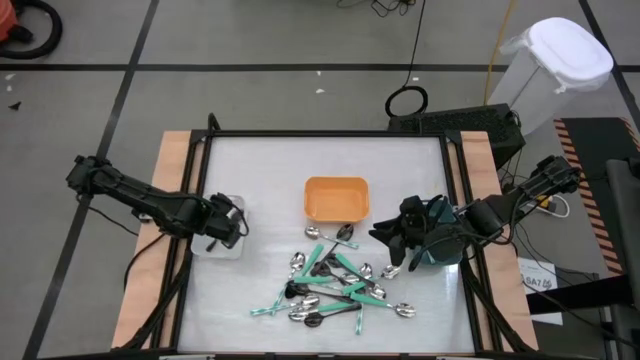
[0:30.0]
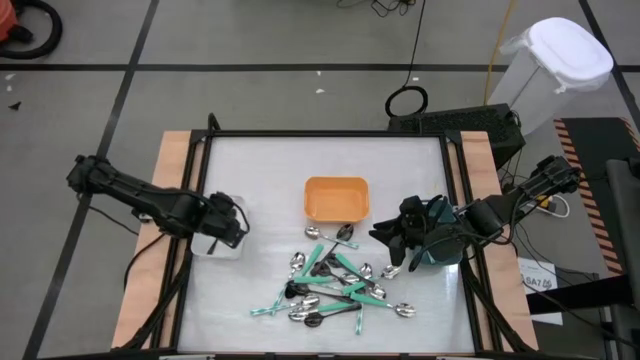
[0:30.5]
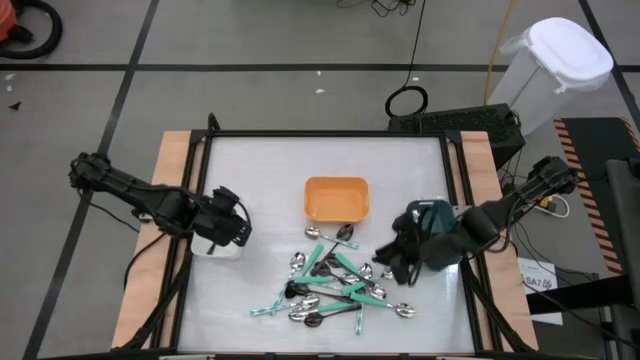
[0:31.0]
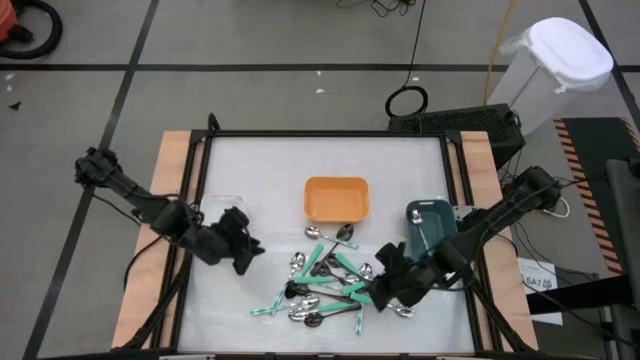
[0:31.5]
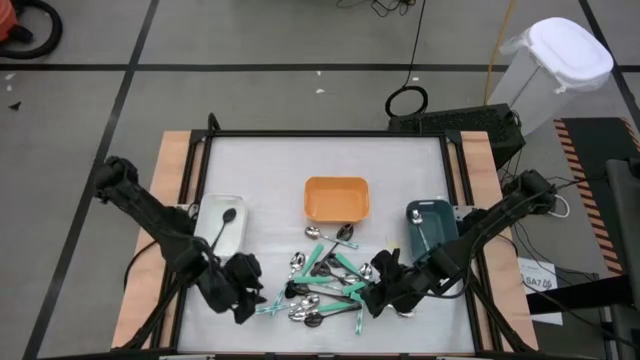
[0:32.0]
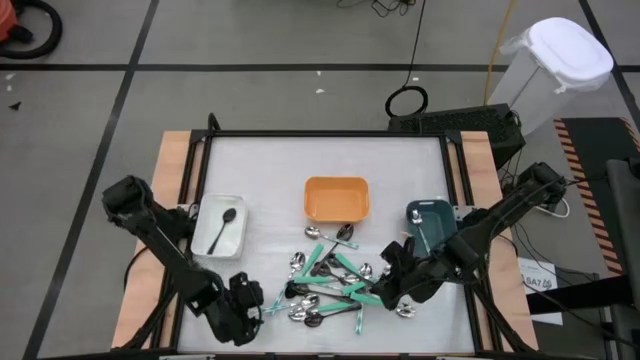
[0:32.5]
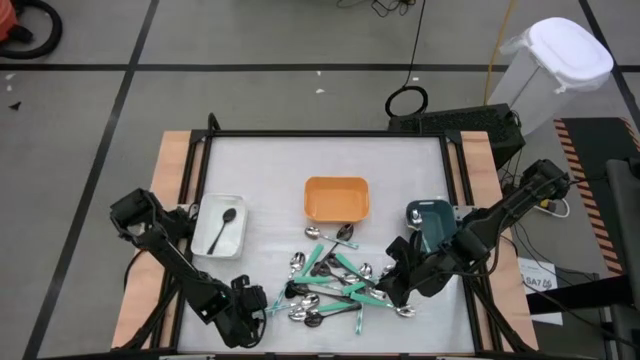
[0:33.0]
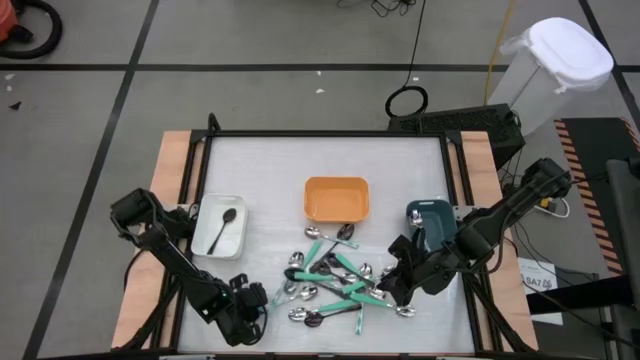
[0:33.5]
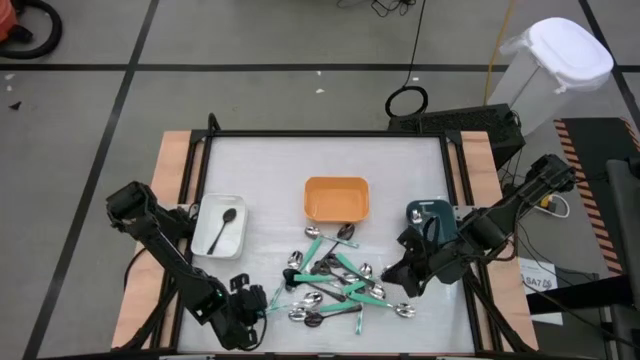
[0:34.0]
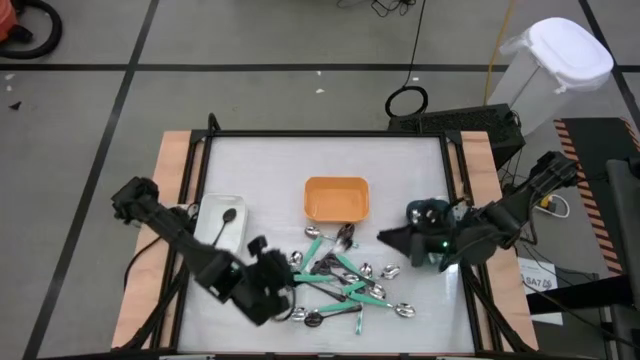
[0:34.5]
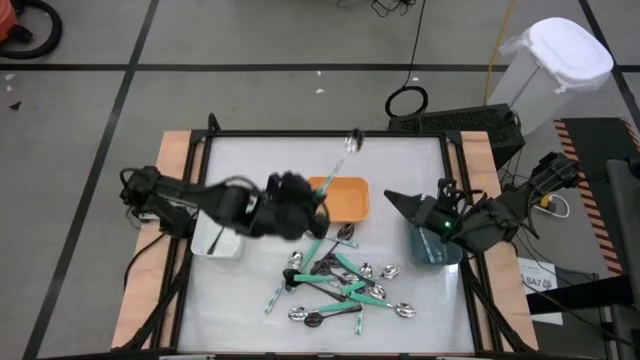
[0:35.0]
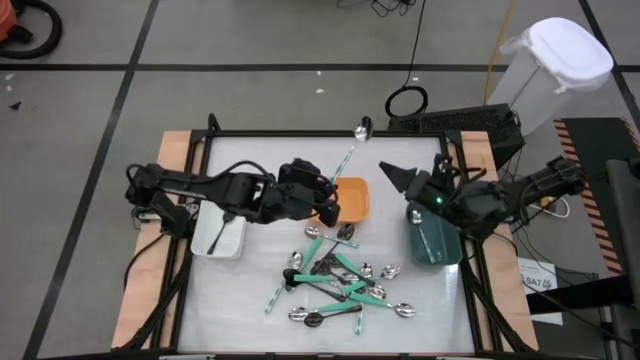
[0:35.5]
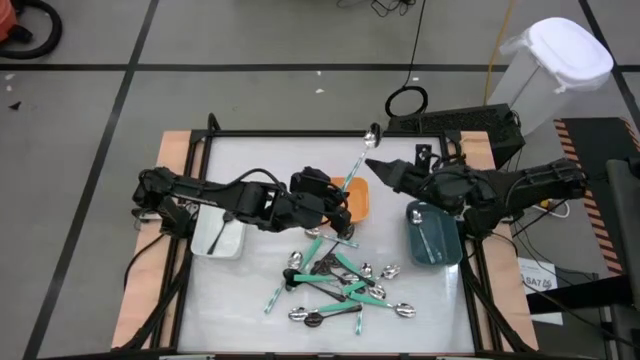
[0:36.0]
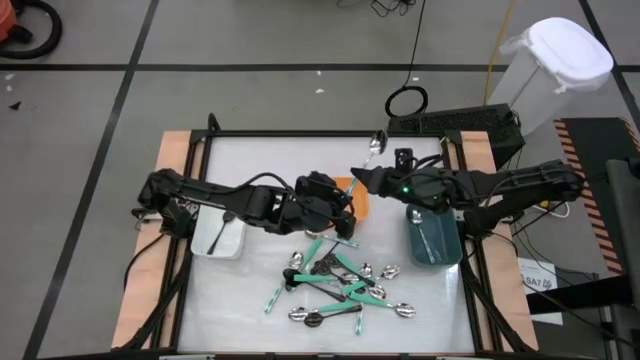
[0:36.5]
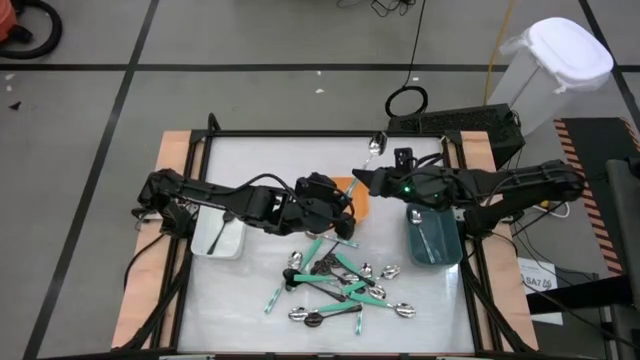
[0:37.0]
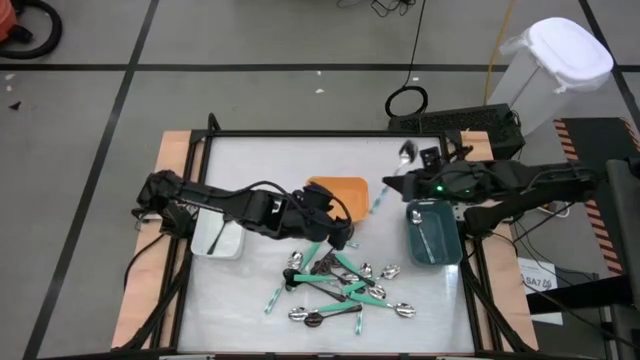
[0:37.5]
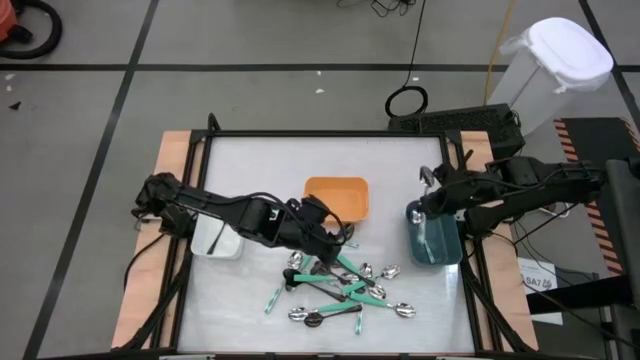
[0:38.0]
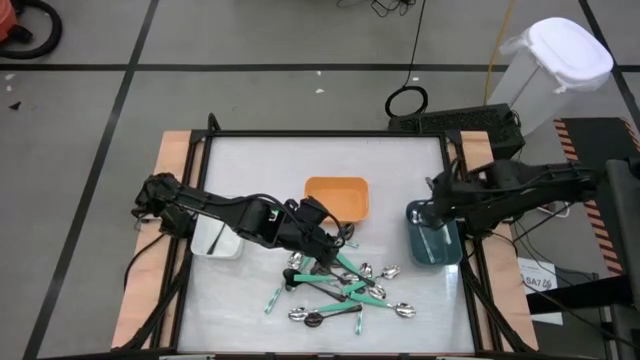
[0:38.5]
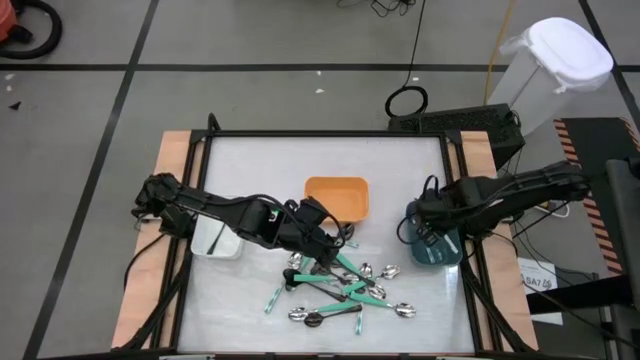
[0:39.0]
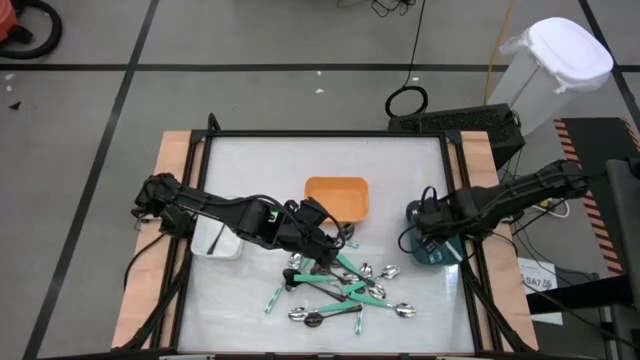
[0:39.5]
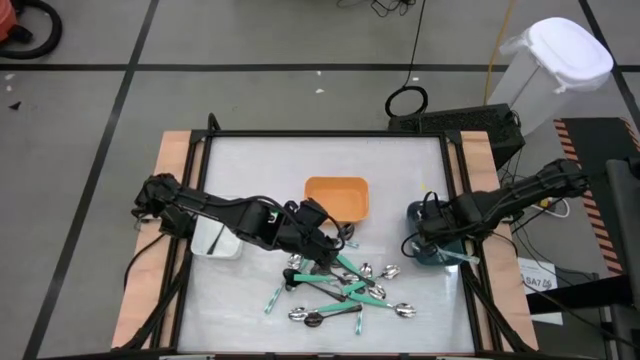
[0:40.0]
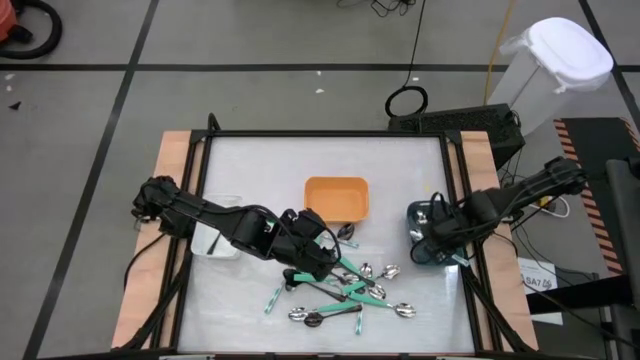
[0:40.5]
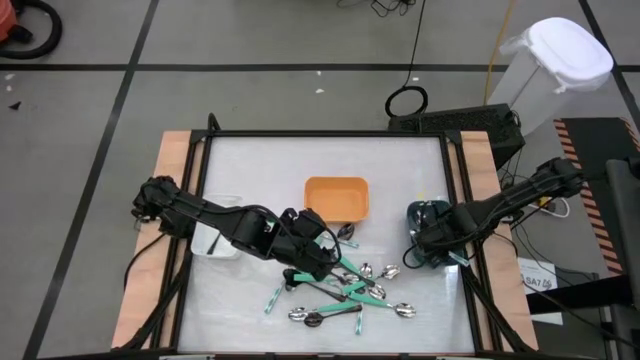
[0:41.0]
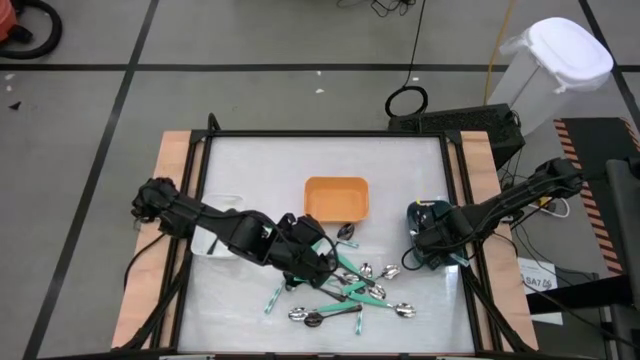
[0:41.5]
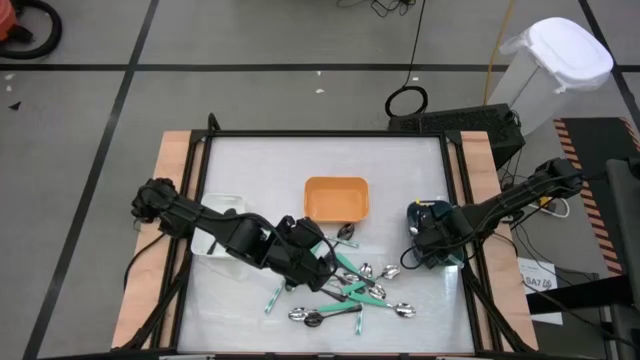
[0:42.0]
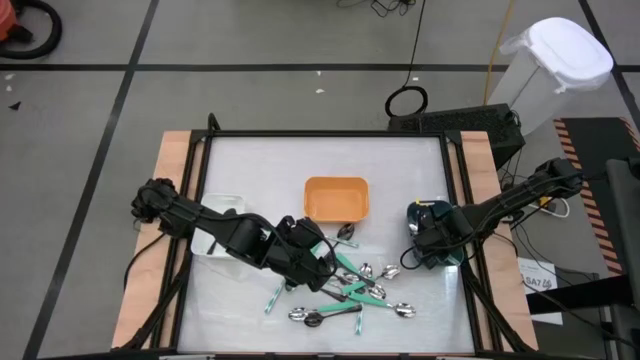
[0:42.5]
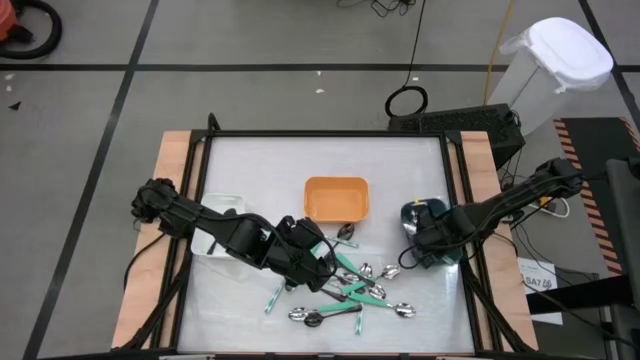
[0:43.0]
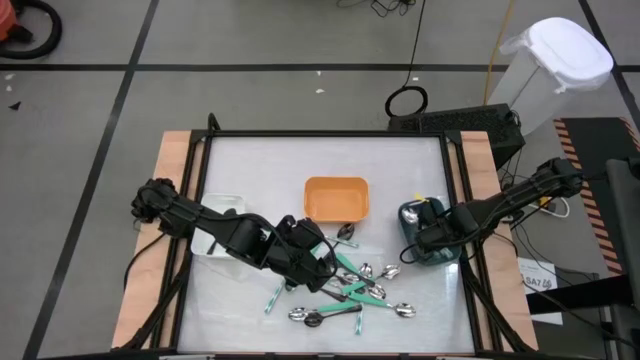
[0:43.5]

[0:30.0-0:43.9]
Task: Sort silverware by color (type)
Put the white spoon into the blue bin

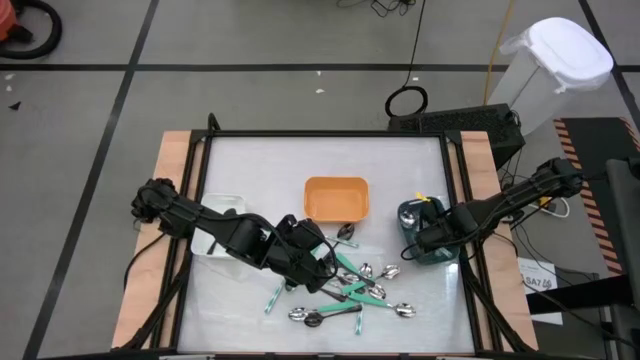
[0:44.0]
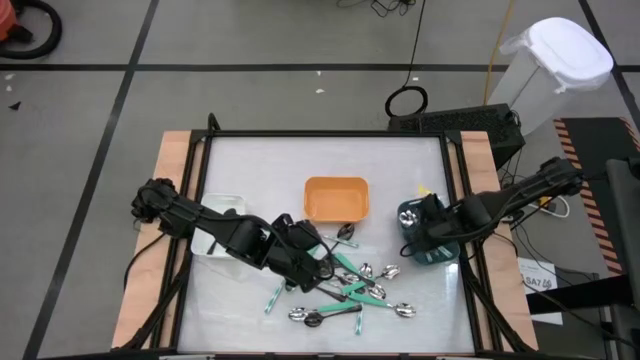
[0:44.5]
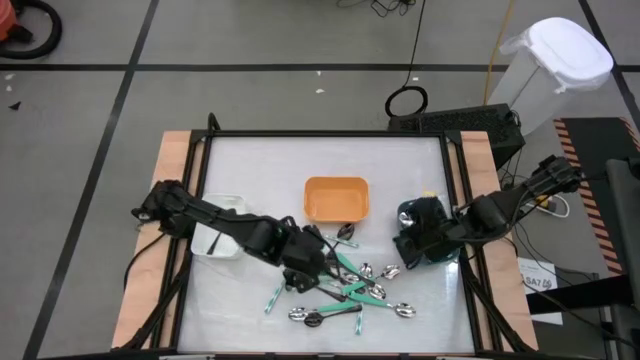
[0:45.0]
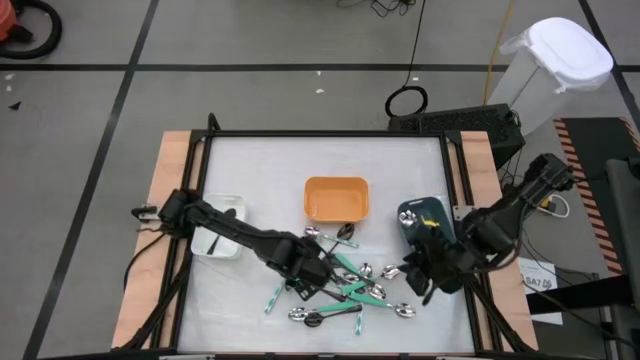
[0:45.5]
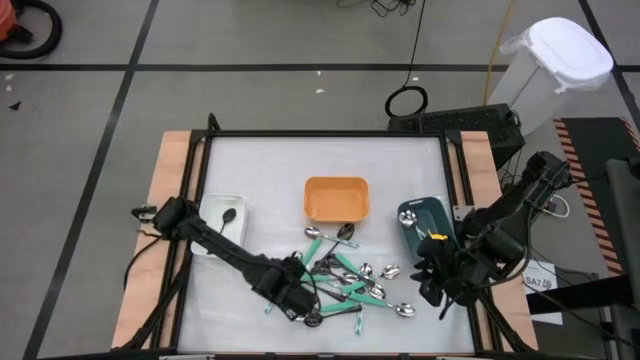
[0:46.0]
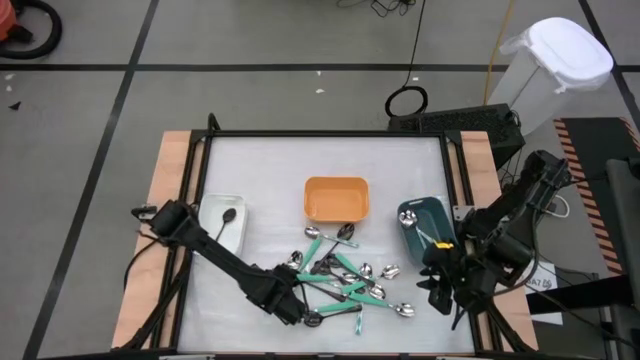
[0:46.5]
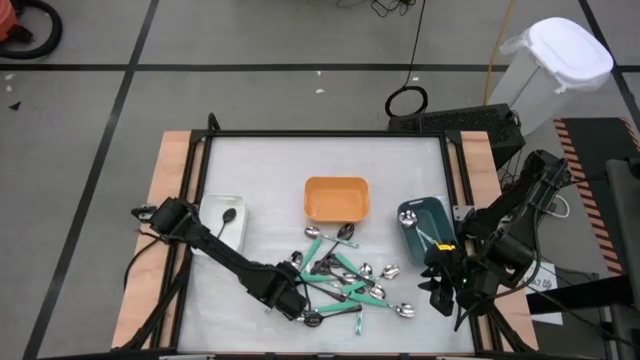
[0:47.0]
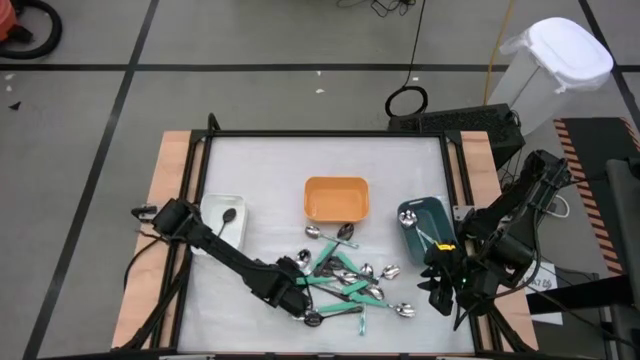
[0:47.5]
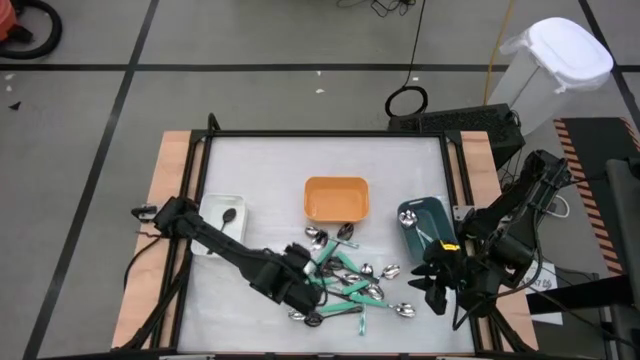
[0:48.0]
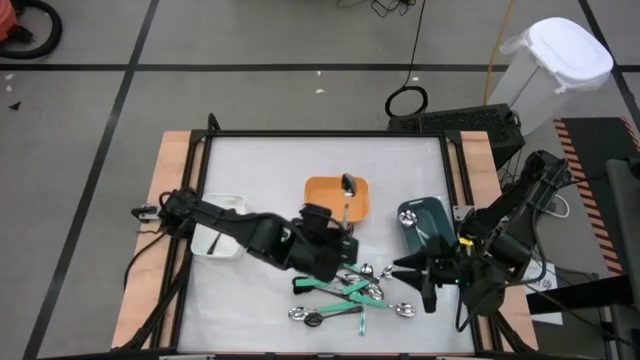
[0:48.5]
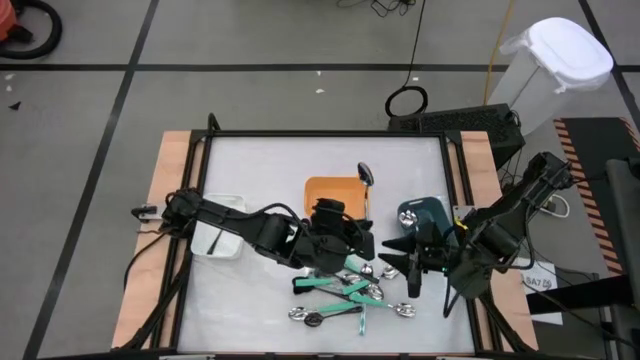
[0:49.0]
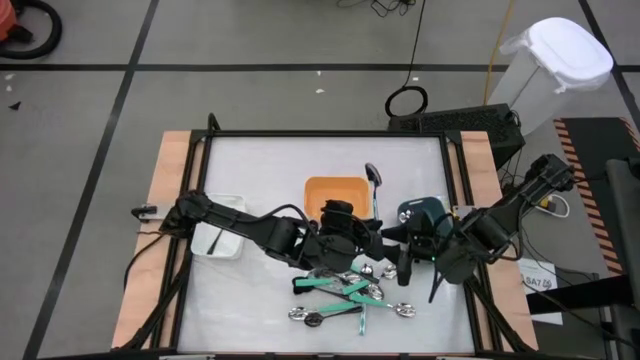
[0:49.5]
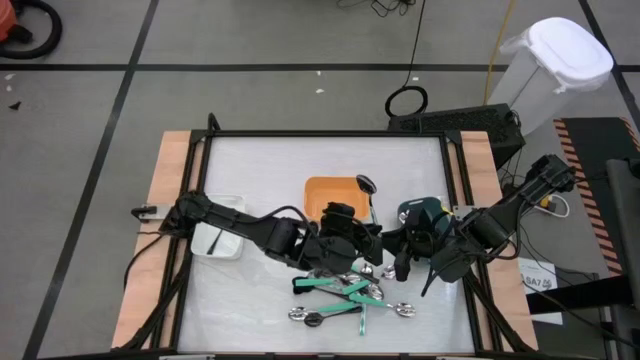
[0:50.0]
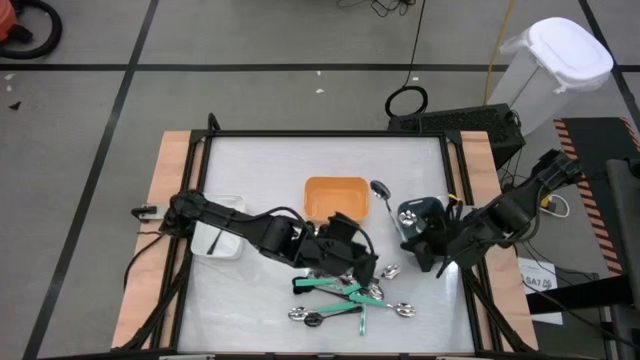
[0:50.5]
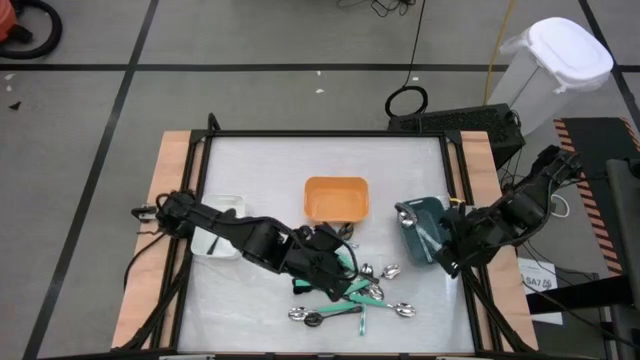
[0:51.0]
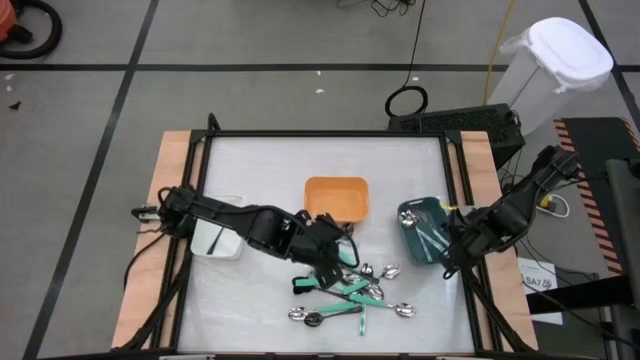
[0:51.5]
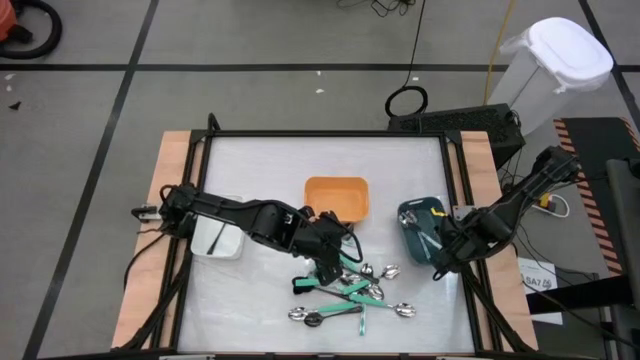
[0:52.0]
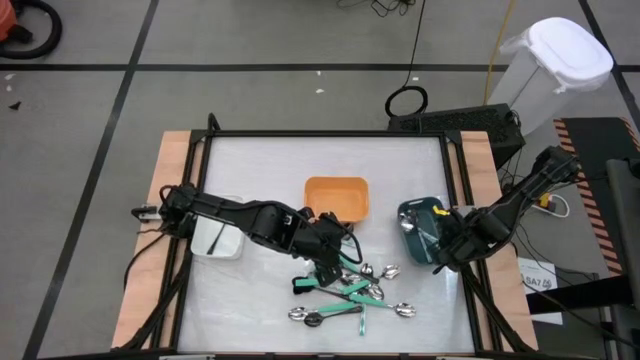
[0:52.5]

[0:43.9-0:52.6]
Put the white spoon into the blue bin
